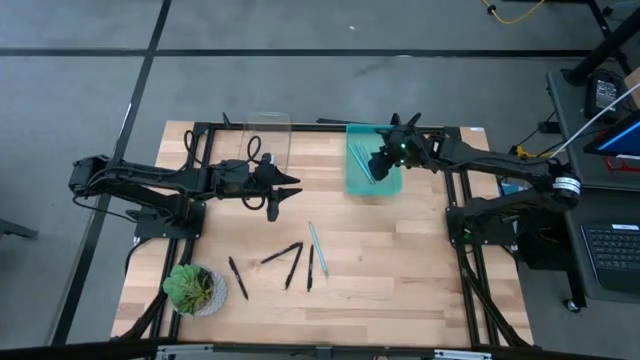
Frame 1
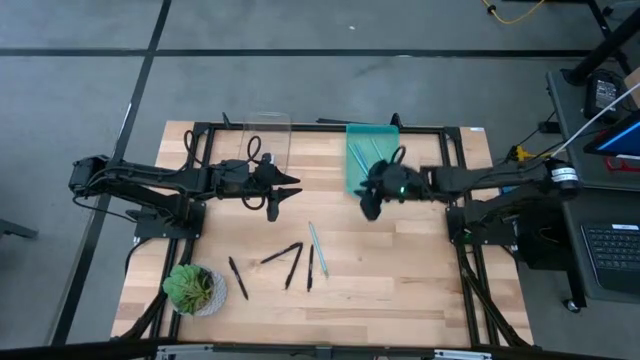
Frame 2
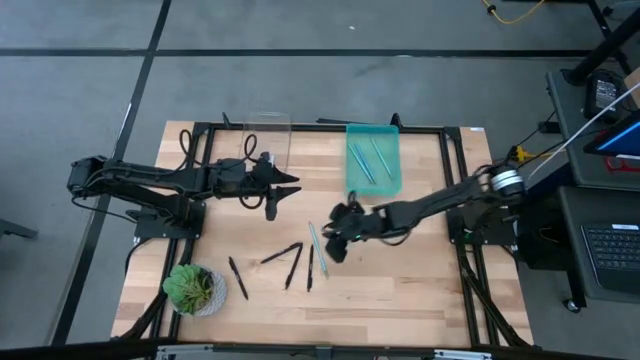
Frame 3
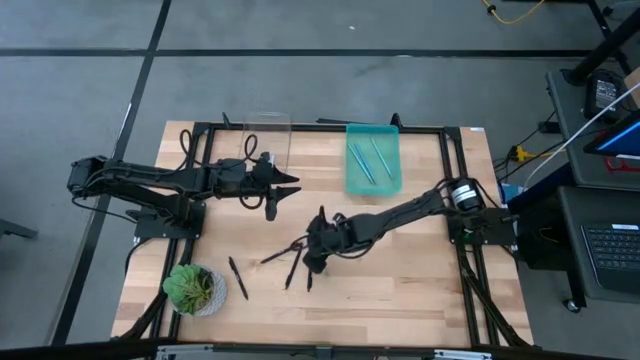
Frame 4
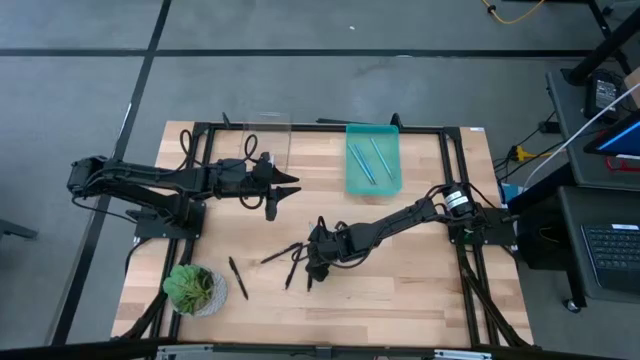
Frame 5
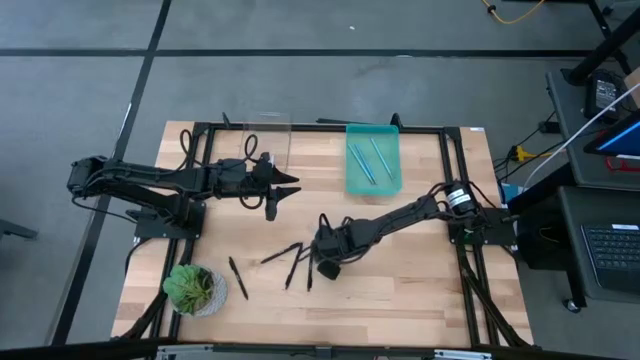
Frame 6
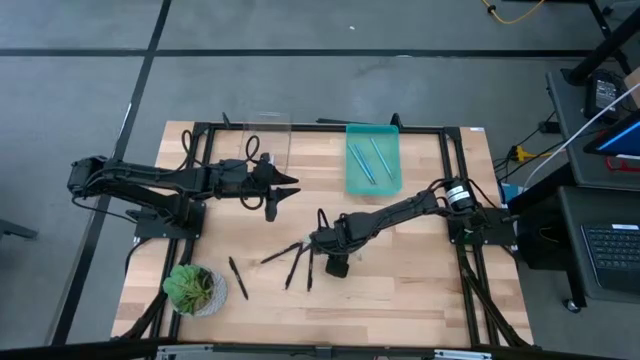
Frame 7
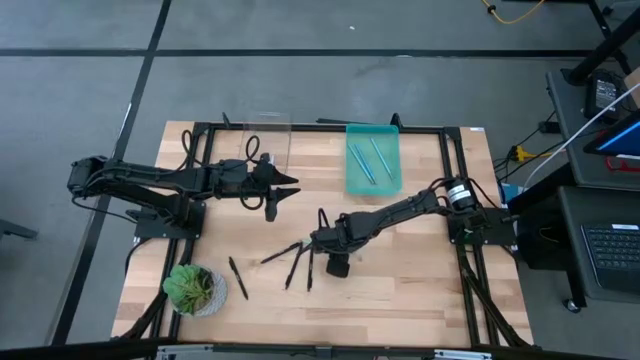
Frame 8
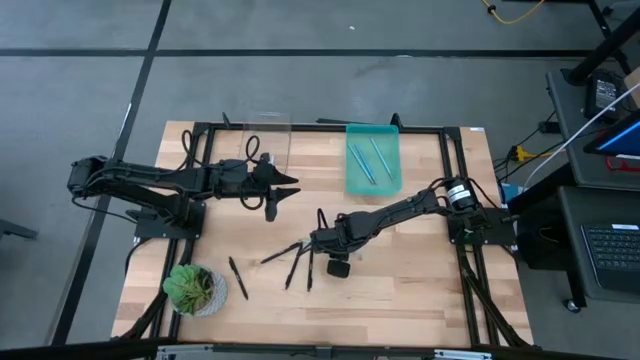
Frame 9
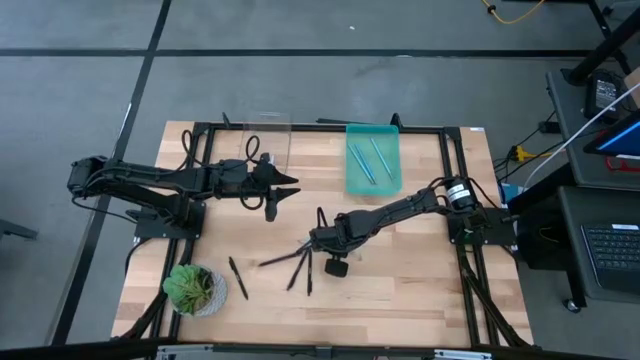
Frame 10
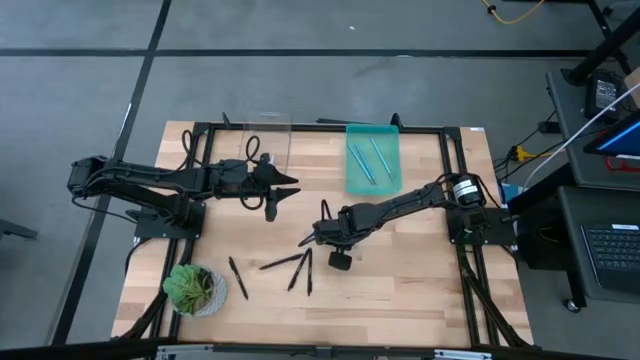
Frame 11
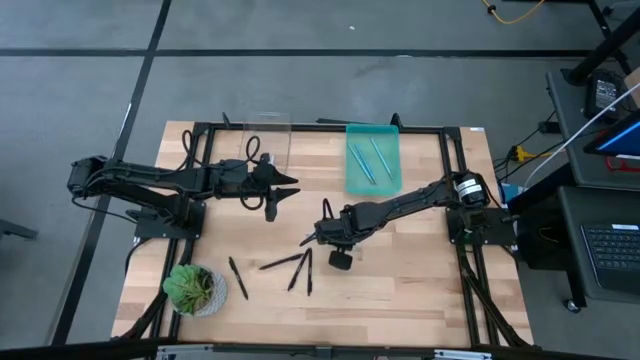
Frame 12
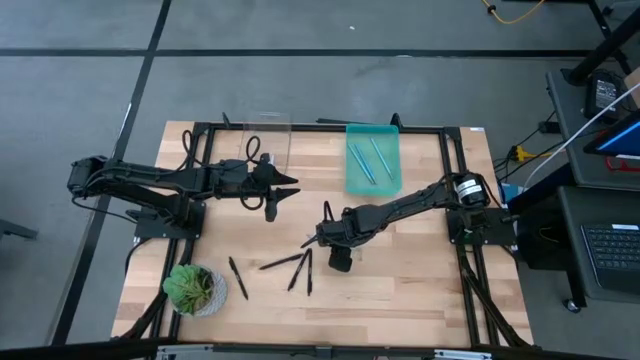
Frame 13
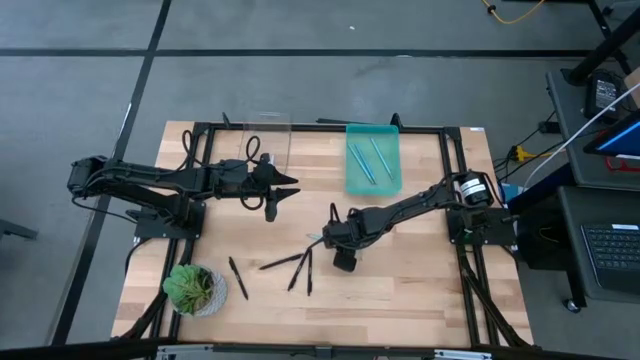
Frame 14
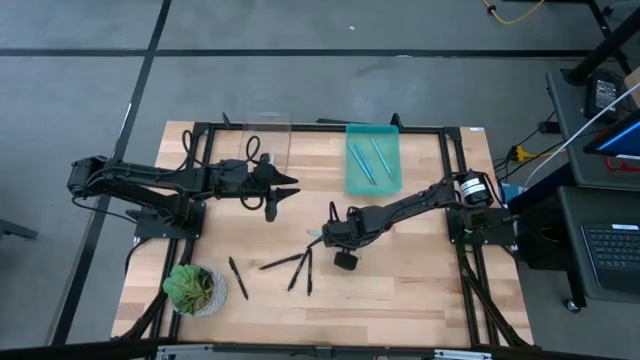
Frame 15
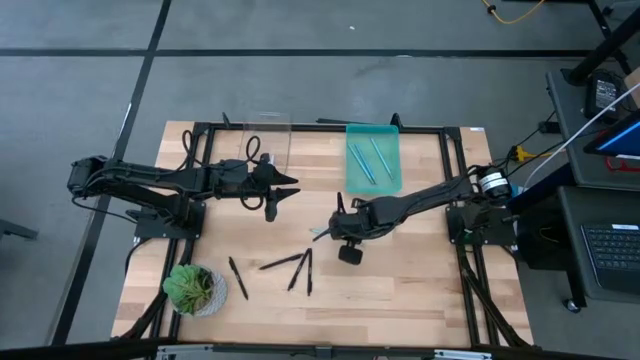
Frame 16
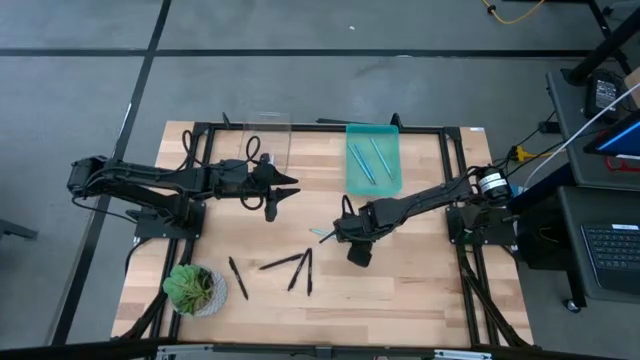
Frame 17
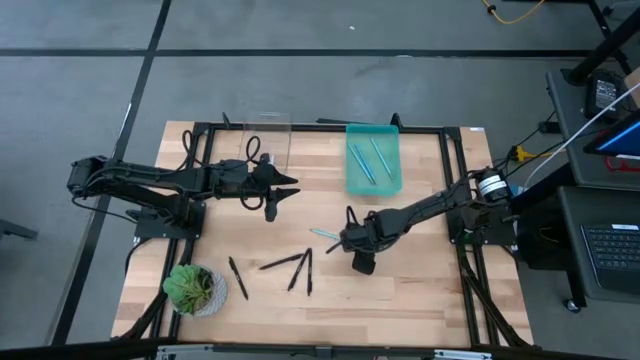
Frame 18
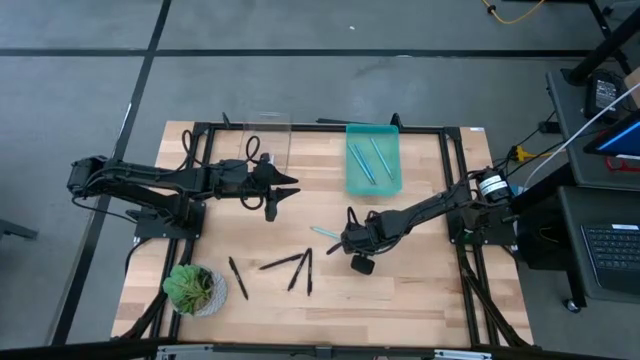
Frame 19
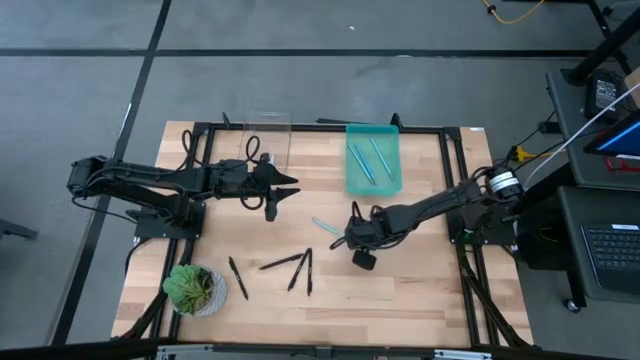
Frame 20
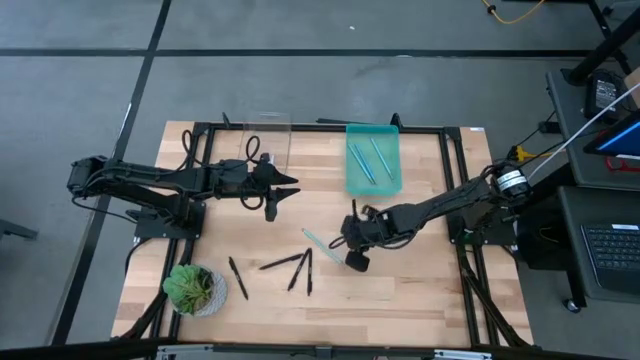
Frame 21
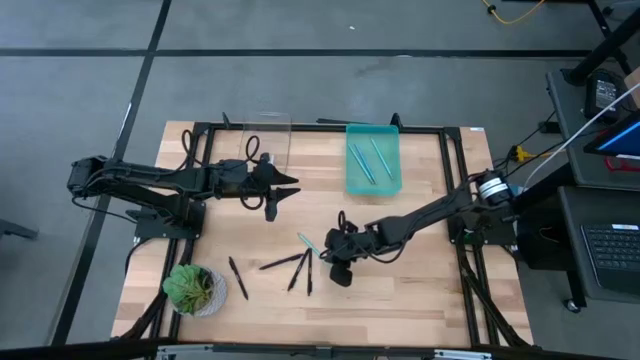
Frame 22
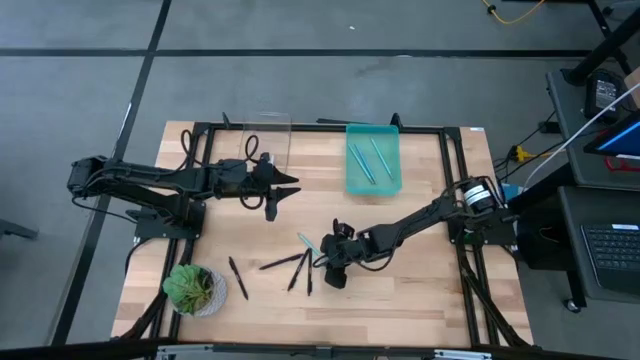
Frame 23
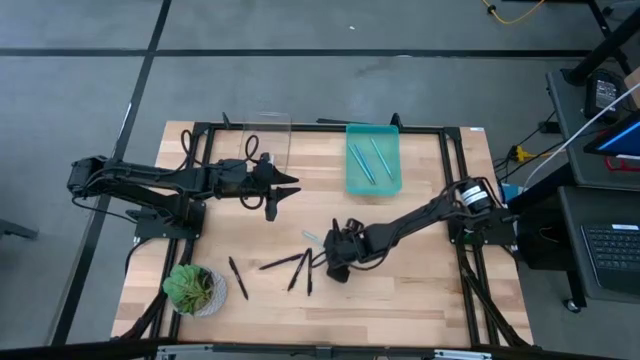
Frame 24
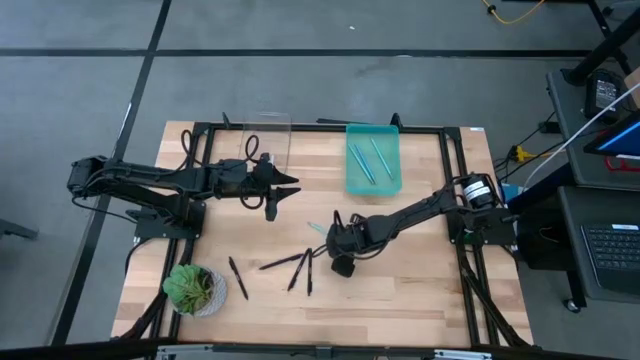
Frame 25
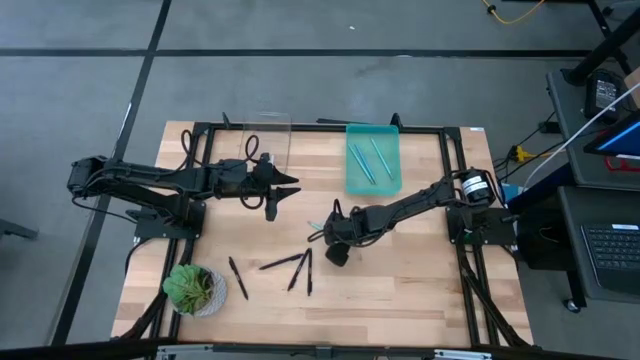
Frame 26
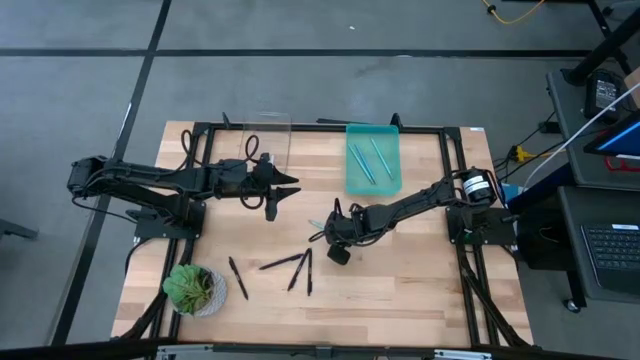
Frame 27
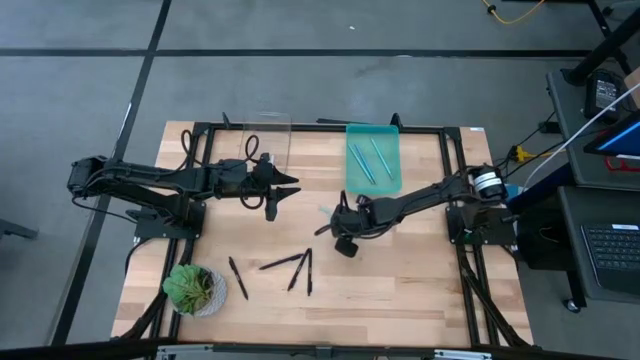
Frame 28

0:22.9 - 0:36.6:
Task: Sort pens & pencils
Put the blue pencil into the blue bin

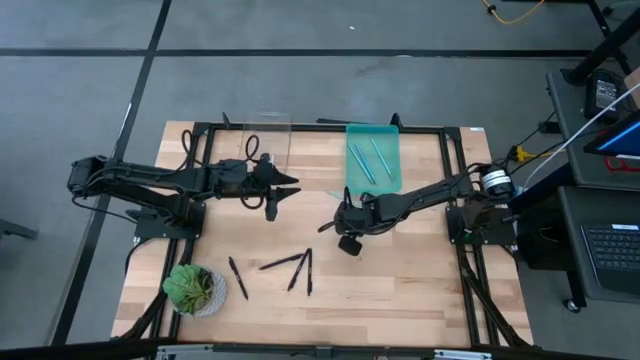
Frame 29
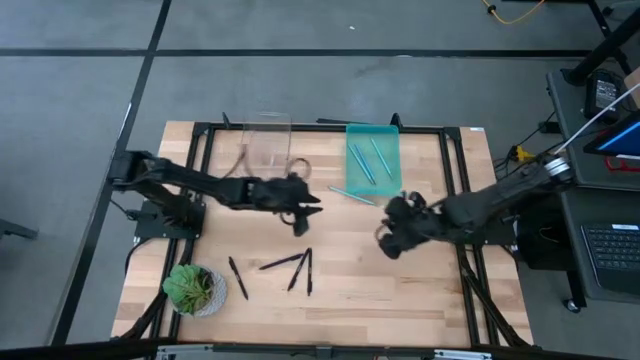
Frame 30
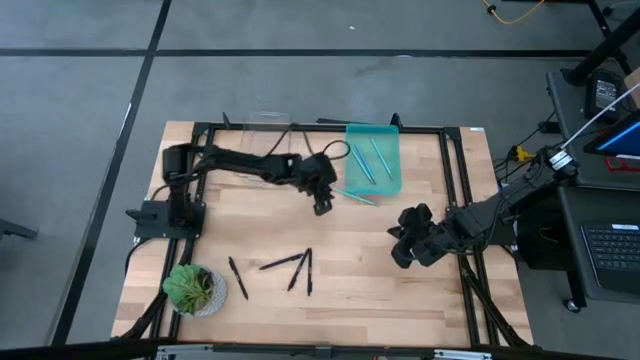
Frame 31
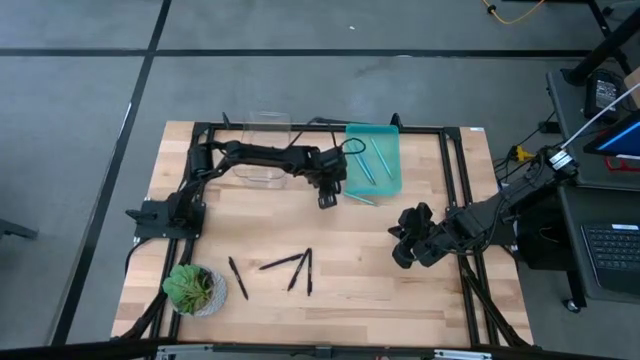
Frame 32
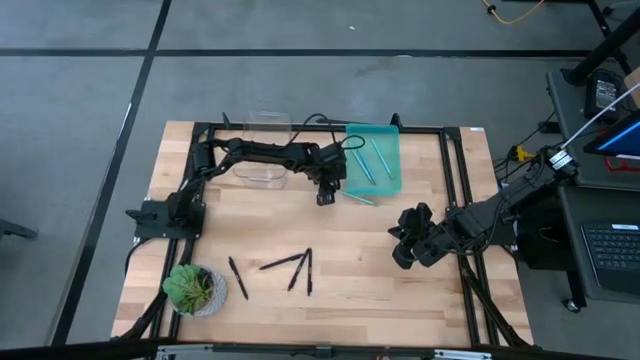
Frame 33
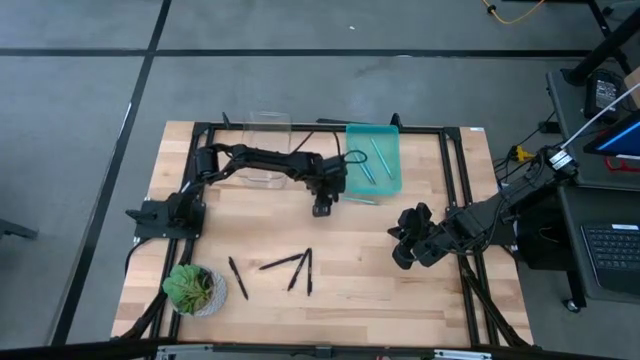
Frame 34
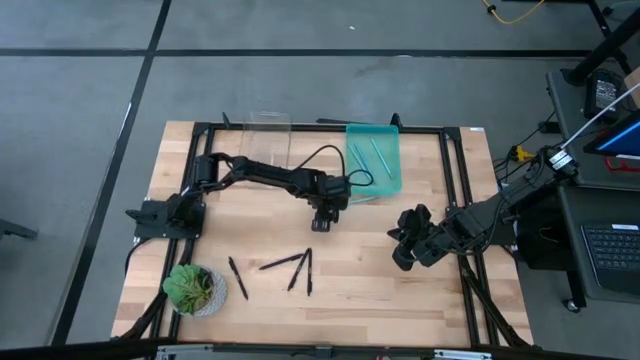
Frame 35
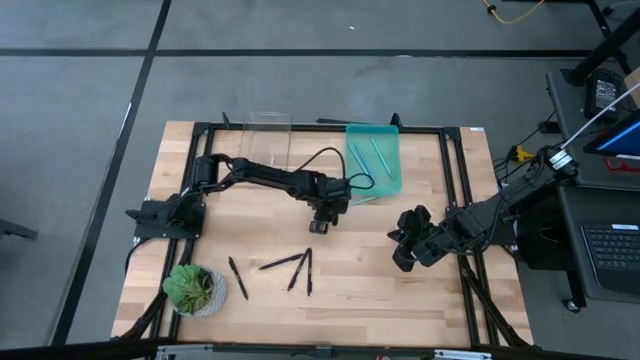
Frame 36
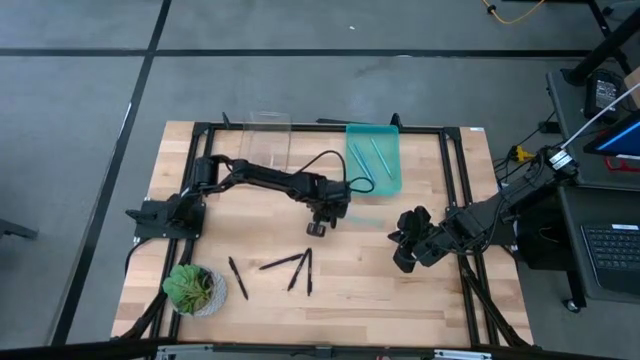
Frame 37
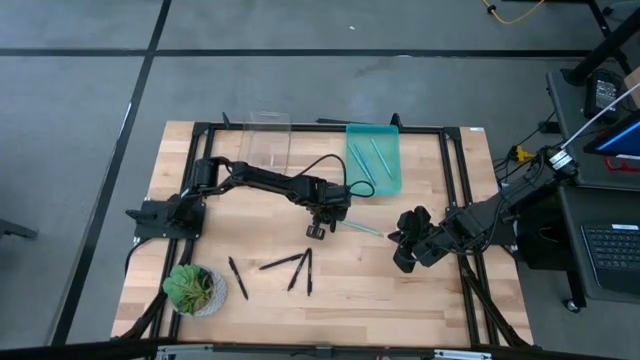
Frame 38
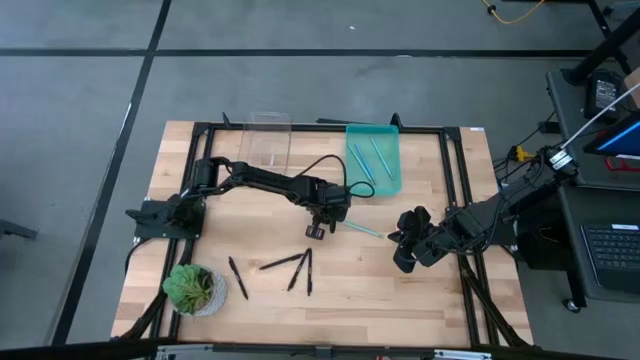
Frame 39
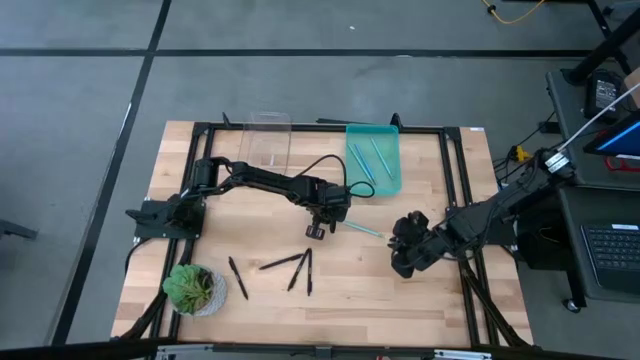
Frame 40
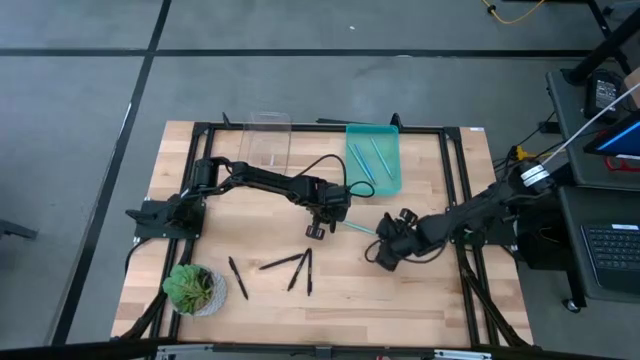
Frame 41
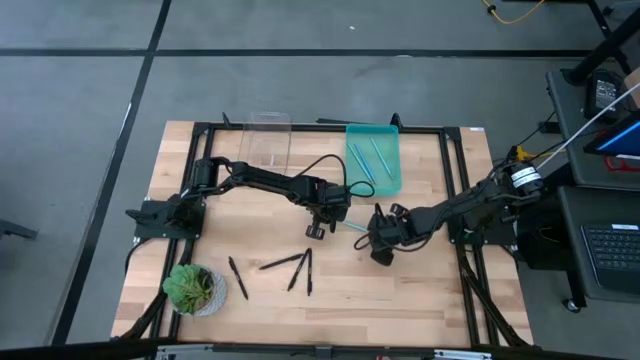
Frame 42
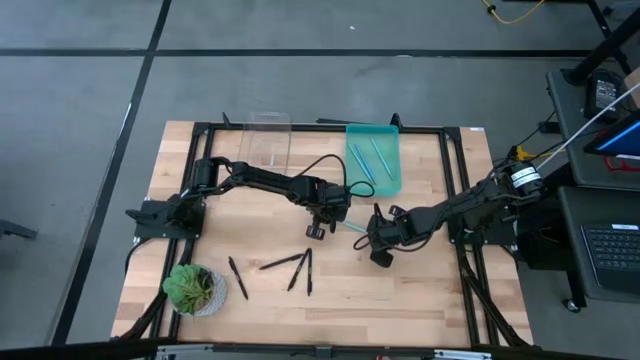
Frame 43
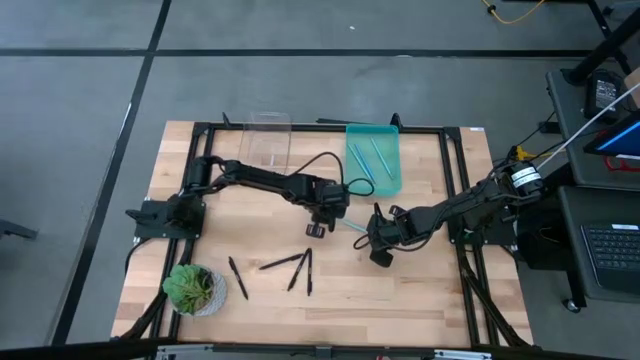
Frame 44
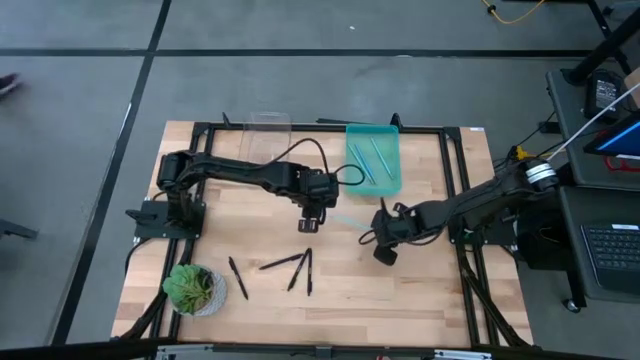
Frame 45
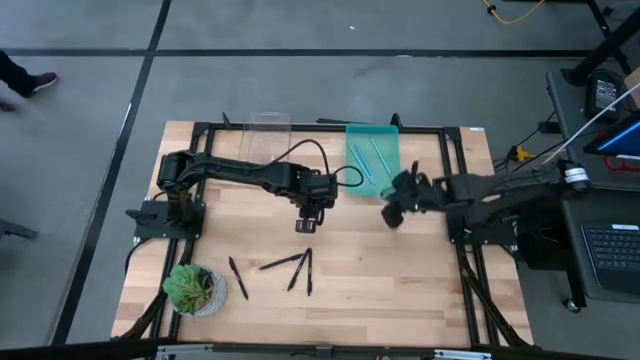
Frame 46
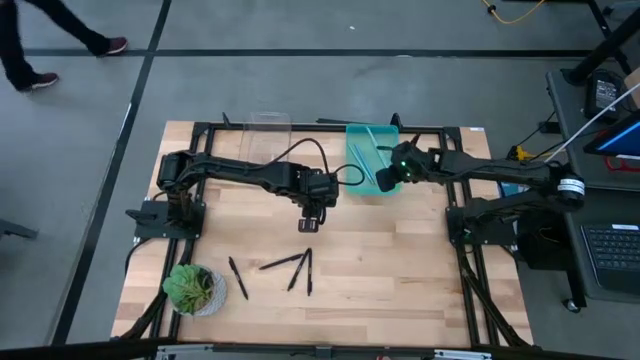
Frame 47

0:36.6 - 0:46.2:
Put the blue pencil into the blue bin
